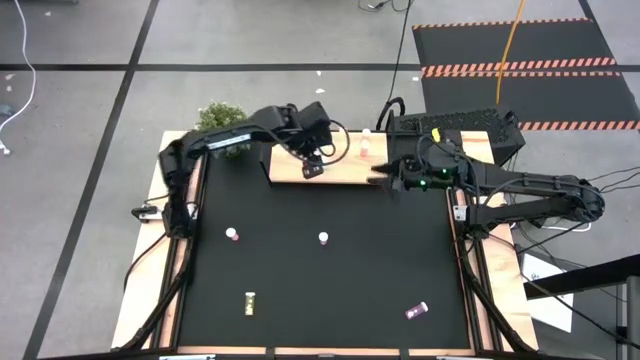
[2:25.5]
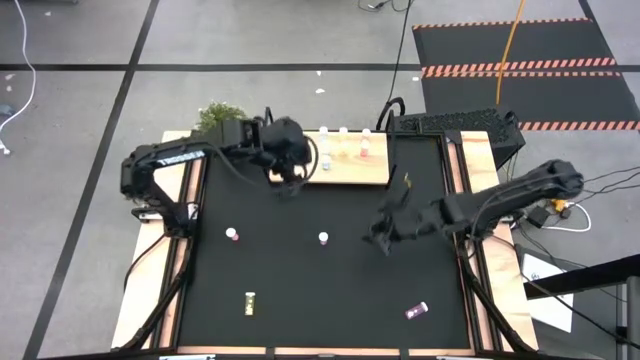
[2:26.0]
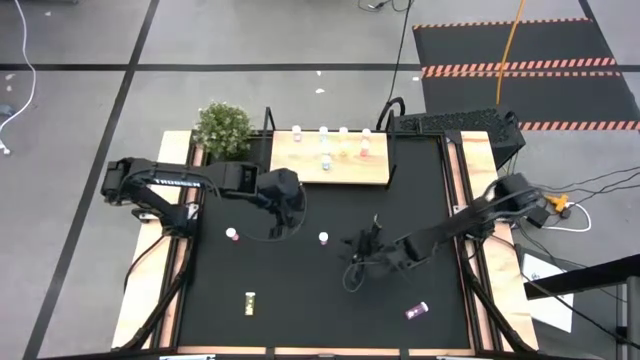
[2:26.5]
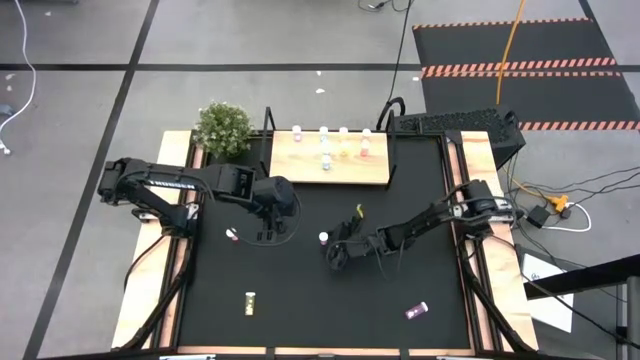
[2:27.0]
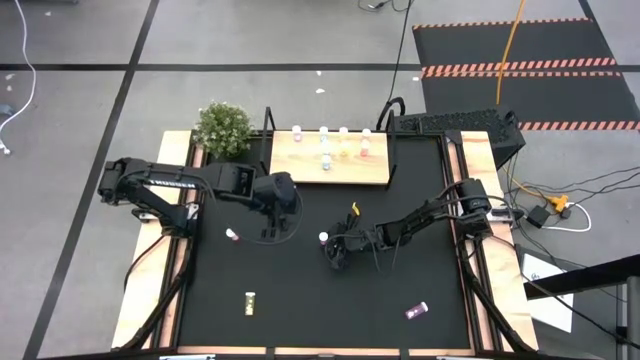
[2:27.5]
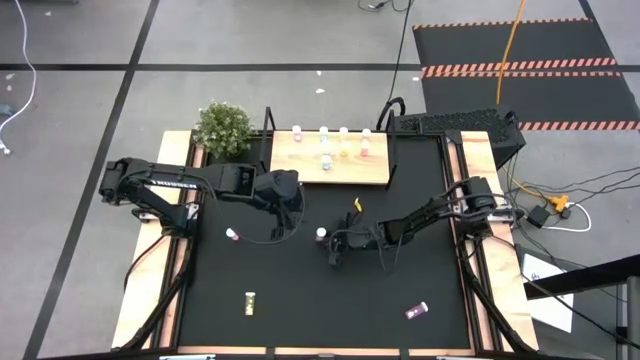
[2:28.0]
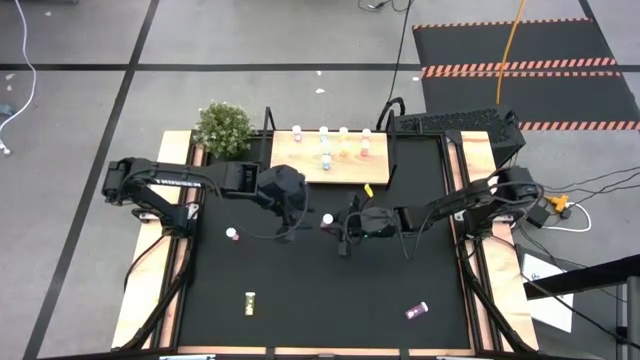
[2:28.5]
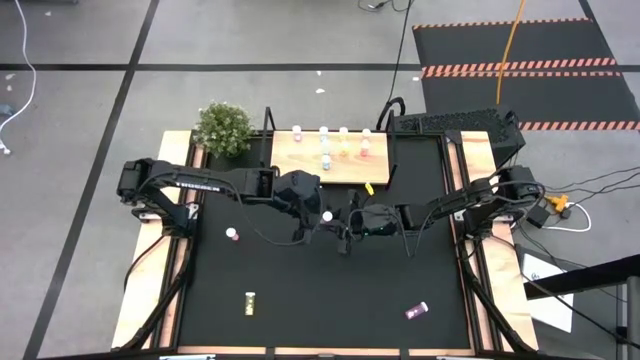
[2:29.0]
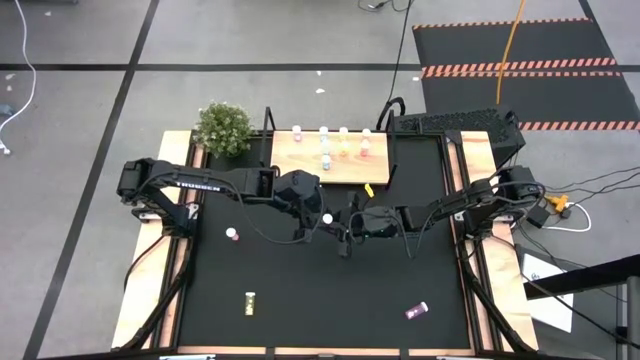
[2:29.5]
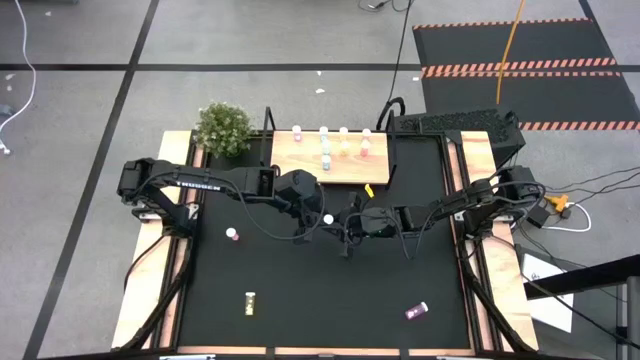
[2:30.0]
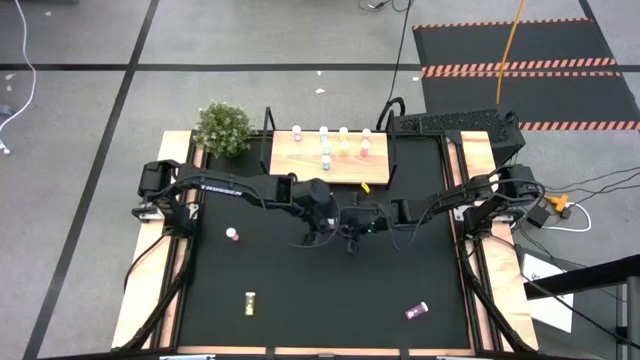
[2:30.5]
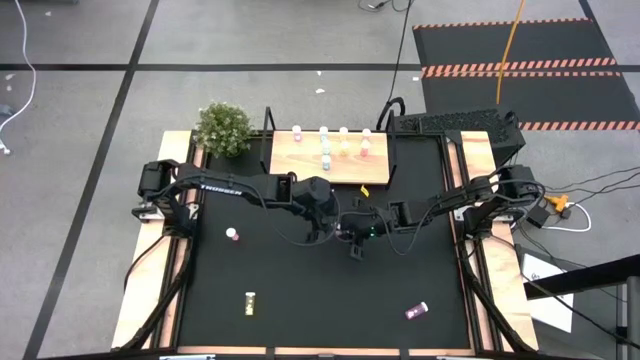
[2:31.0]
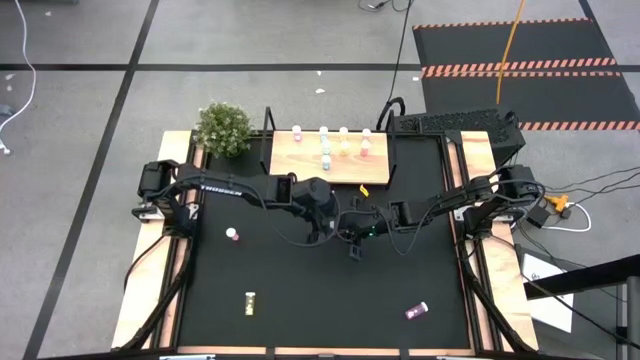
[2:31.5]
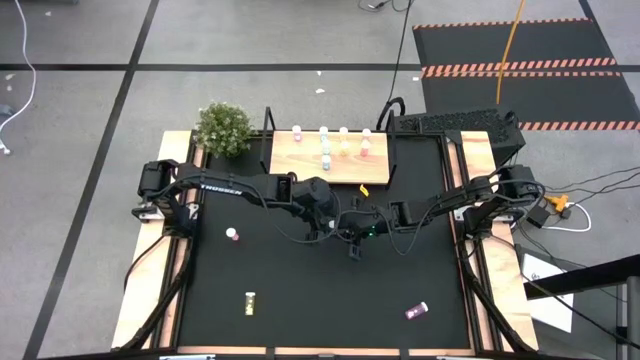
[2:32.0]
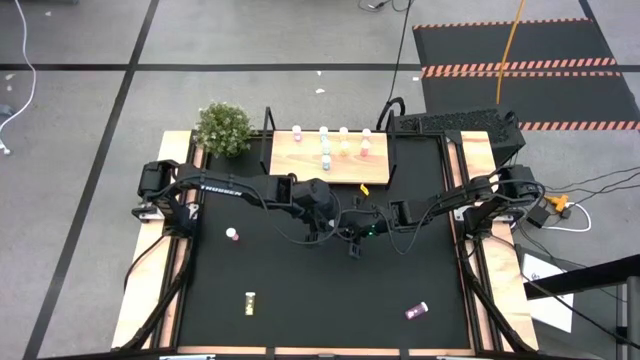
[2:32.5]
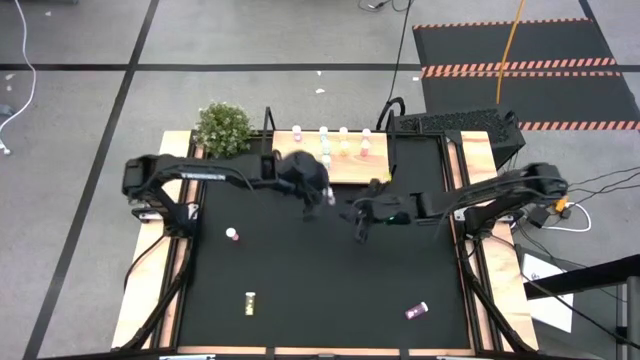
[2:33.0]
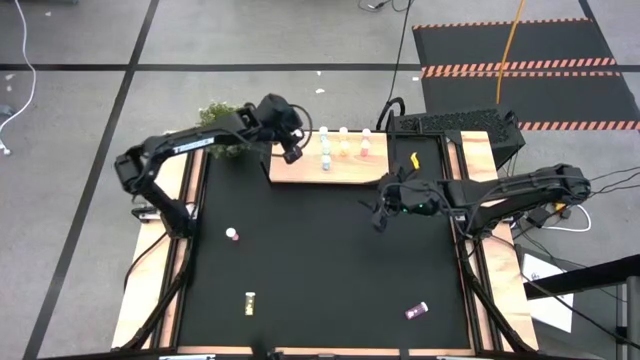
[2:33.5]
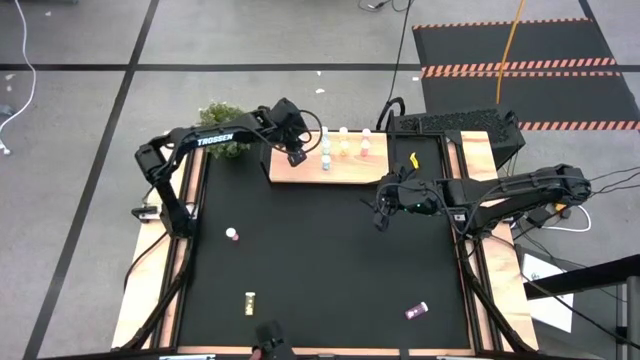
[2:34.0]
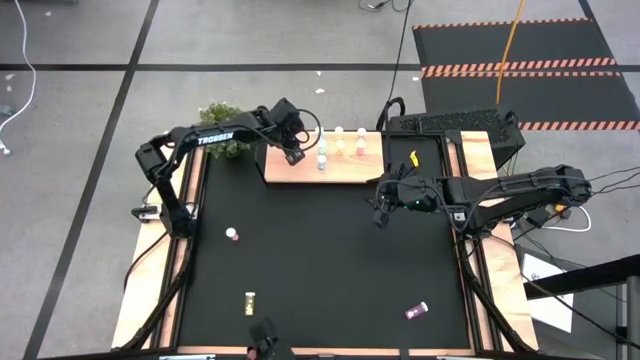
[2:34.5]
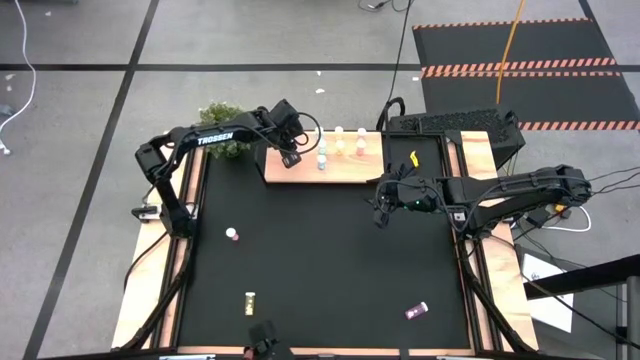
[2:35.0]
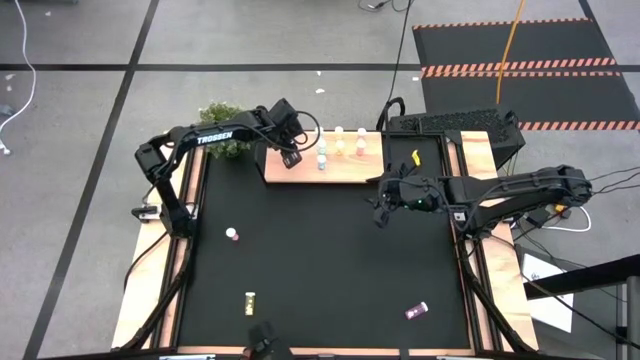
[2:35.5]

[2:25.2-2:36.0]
Task: Pick and place medicine bottles onto shelf by color
Put the top purple pill bottle on the shelf aligned with the other purple pill bottle

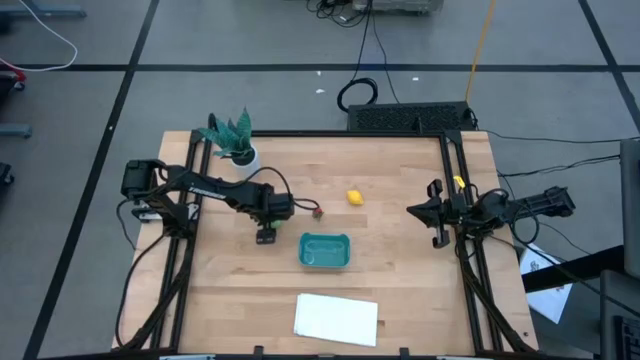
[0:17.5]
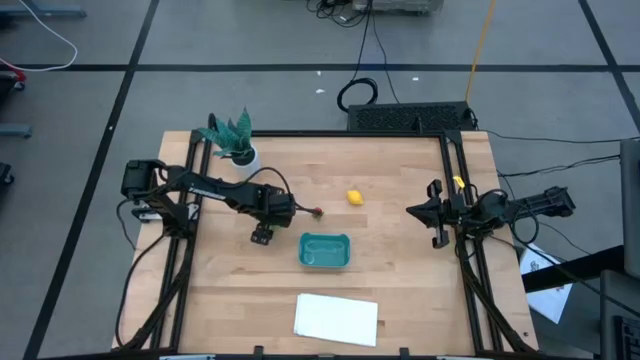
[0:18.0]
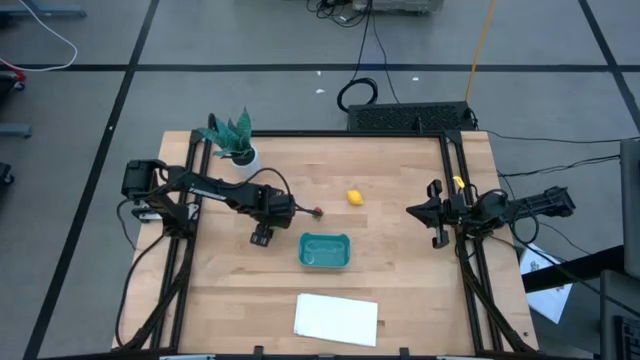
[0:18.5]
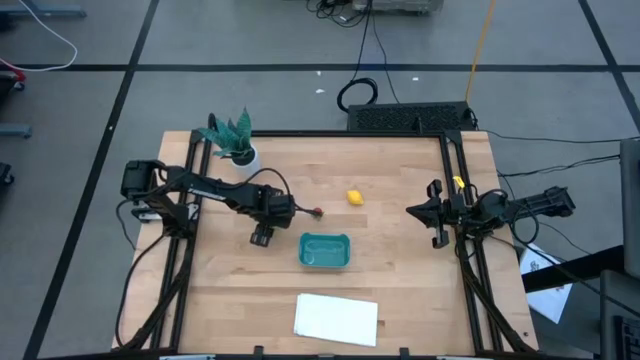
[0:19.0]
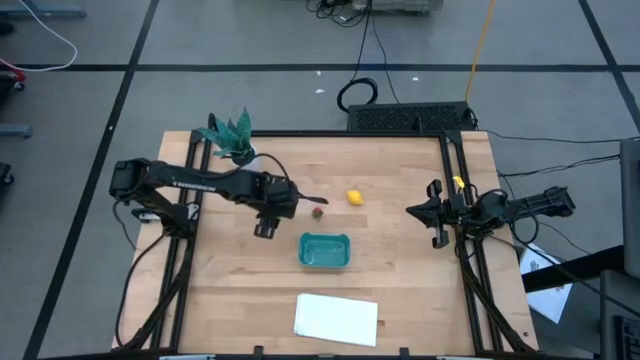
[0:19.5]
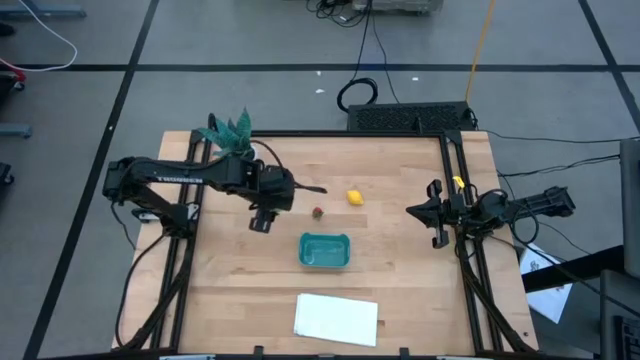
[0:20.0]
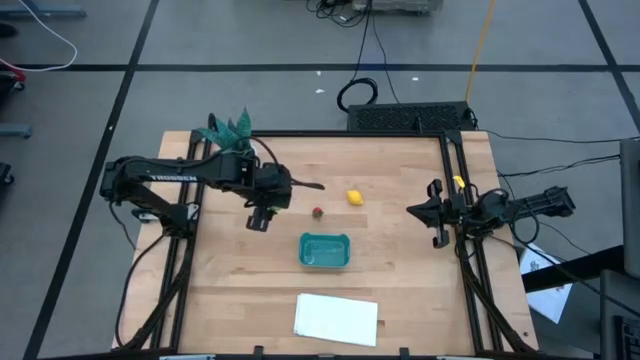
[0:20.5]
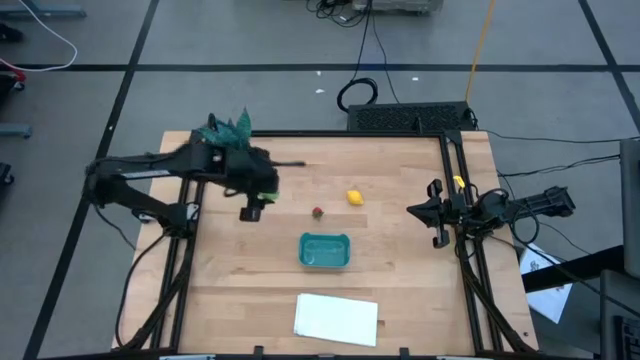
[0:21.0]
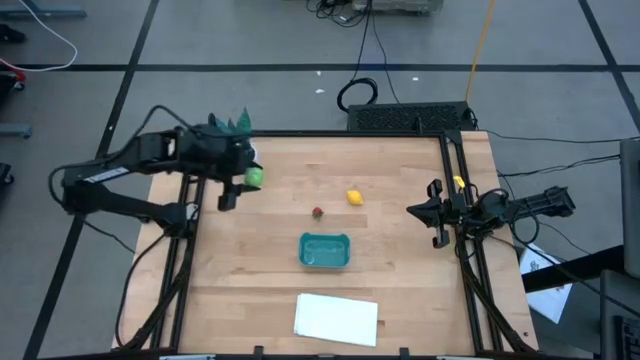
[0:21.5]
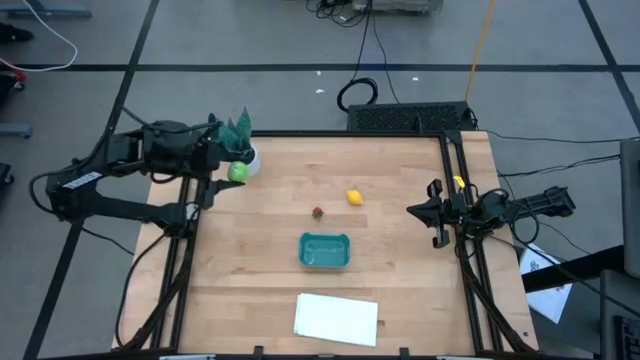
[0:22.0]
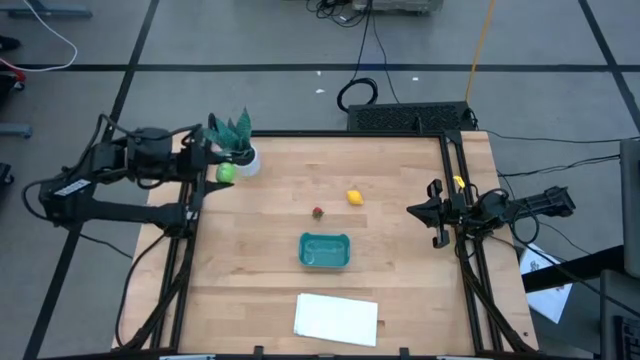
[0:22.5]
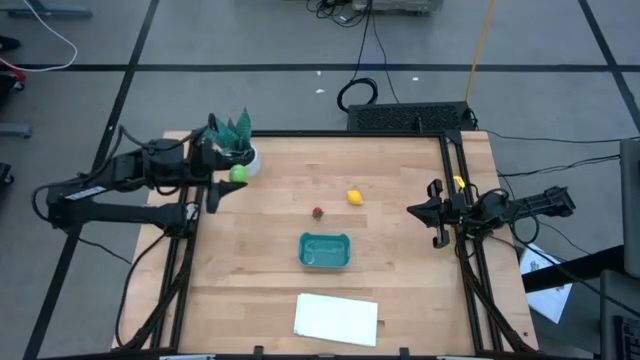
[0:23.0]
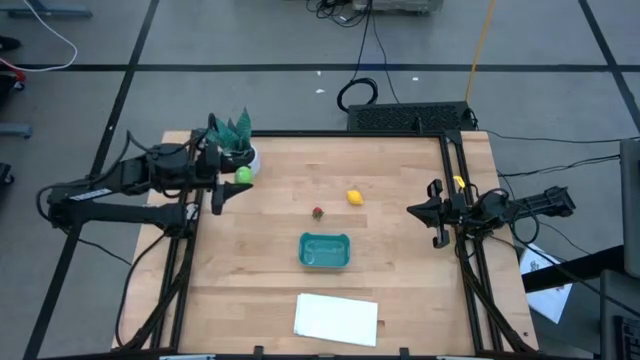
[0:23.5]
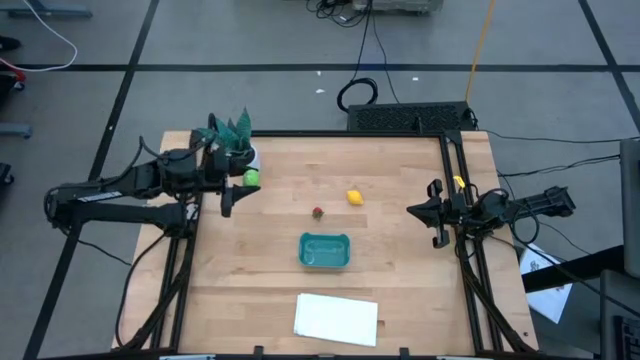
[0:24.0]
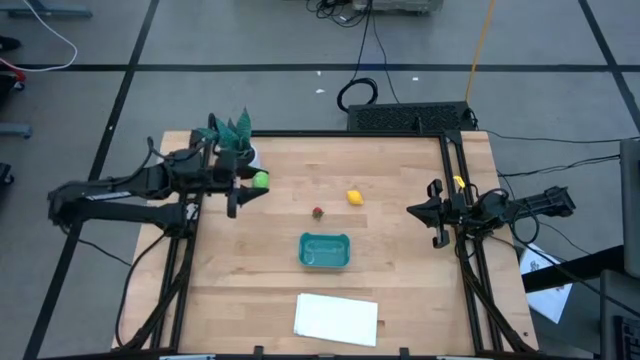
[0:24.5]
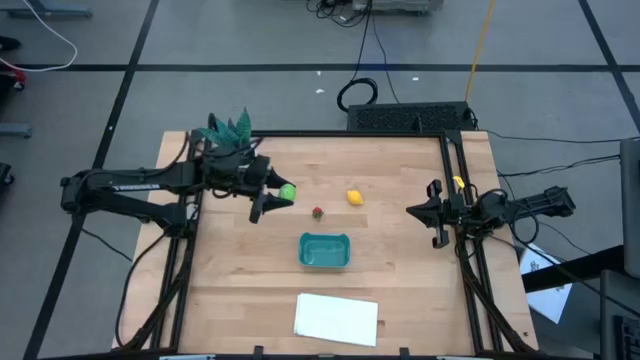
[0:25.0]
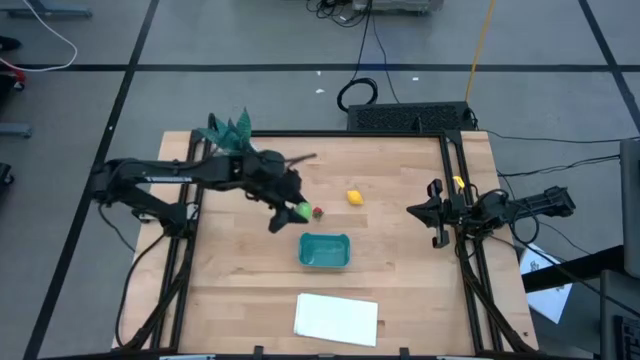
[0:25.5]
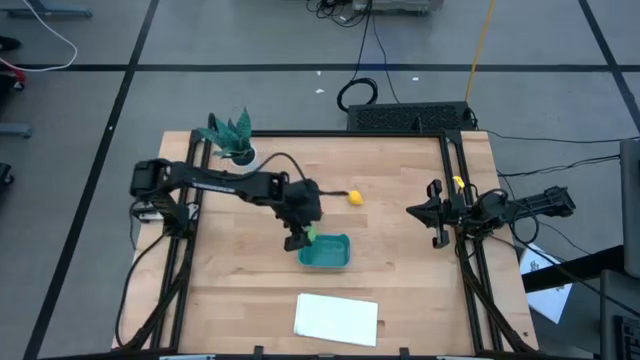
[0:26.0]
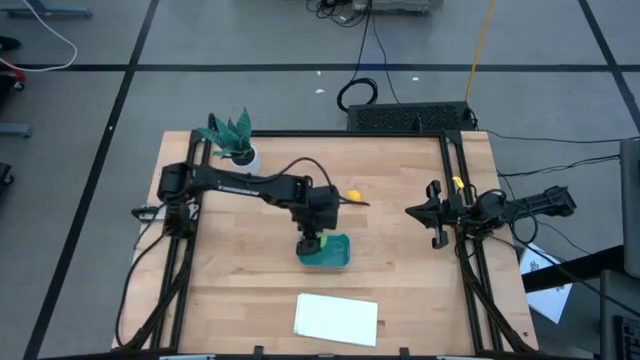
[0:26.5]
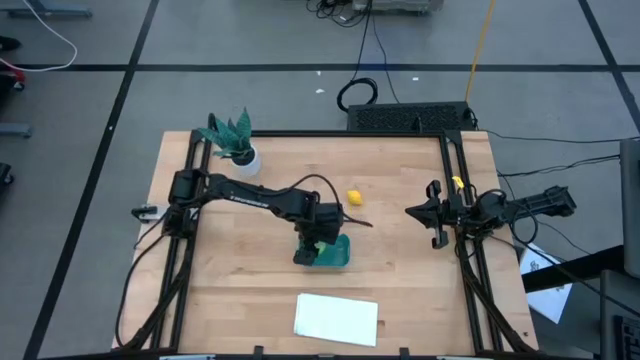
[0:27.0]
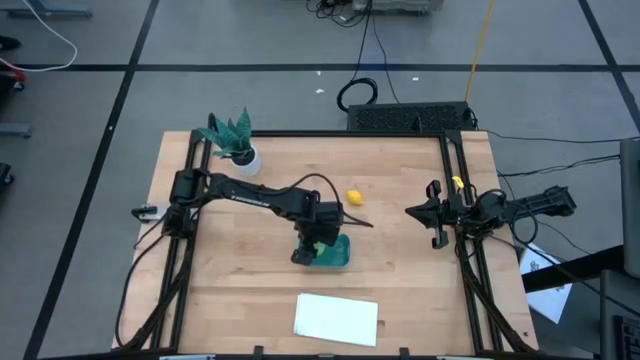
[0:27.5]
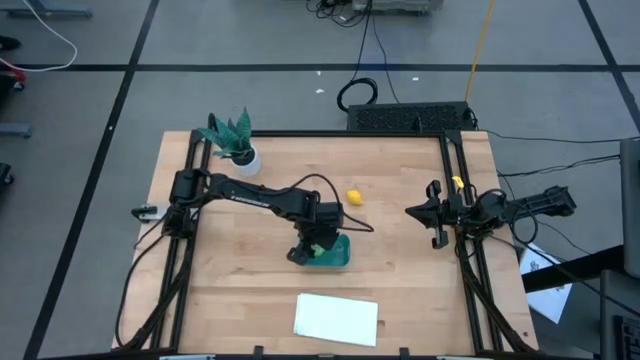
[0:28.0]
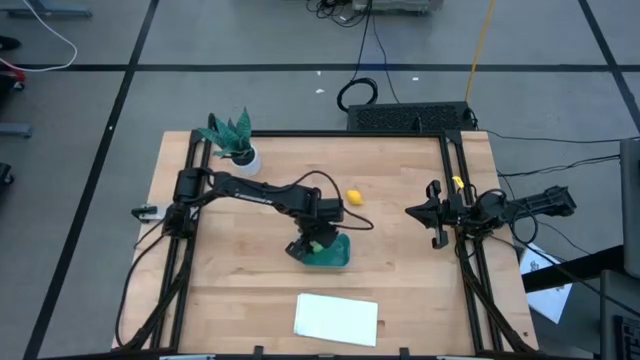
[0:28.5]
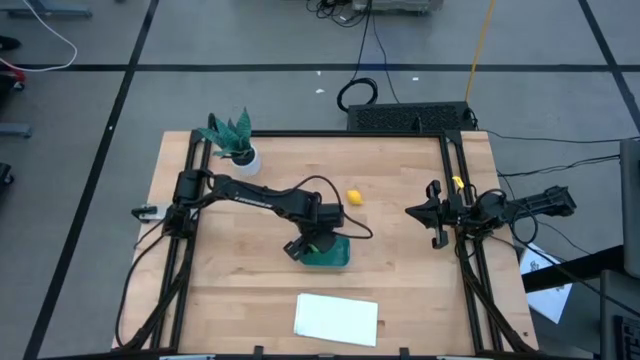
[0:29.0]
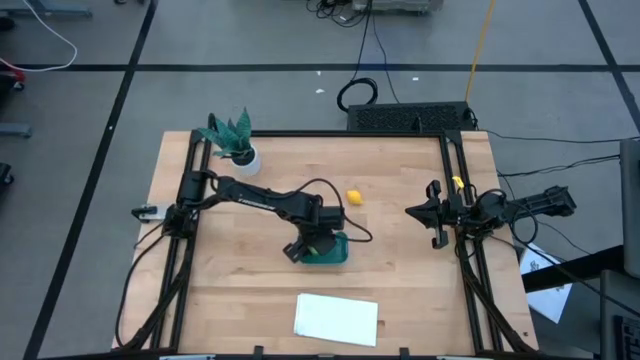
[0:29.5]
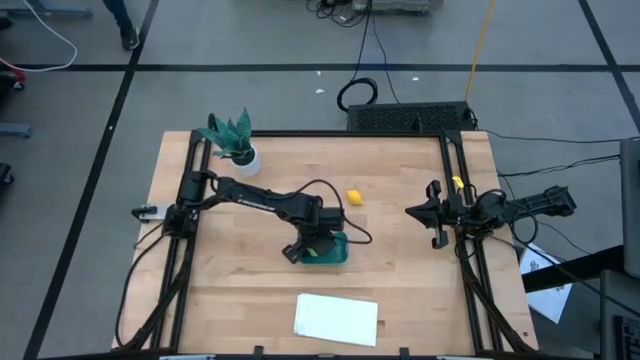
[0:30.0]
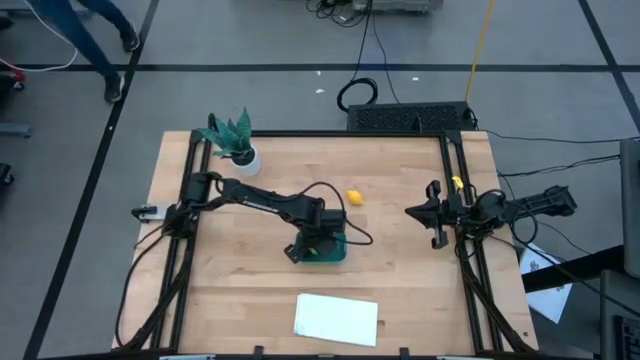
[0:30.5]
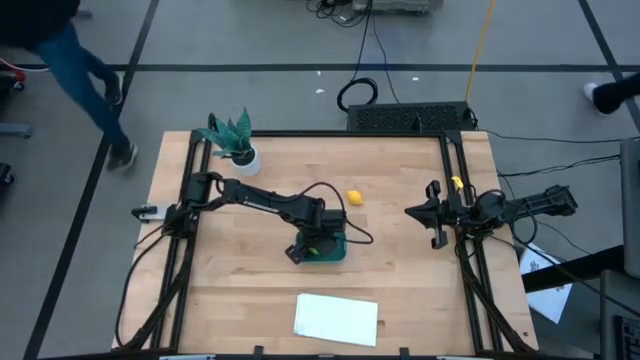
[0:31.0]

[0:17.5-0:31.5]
Task: Pick and placing Produce into tupperware
Put the cabbage into the blue bin
